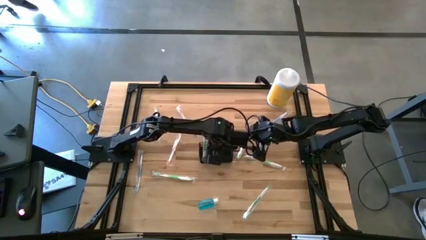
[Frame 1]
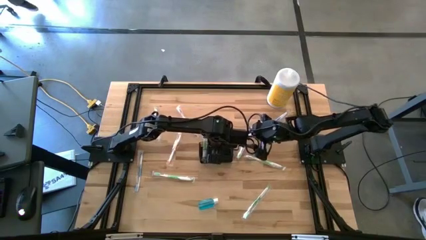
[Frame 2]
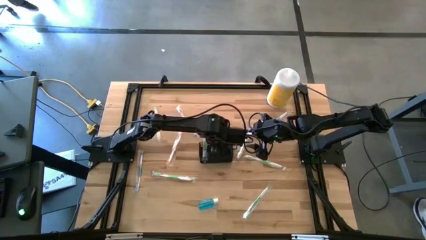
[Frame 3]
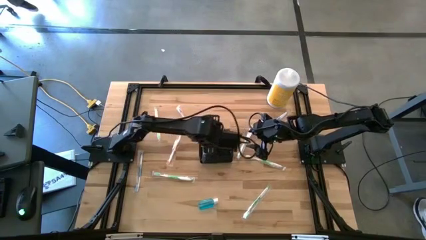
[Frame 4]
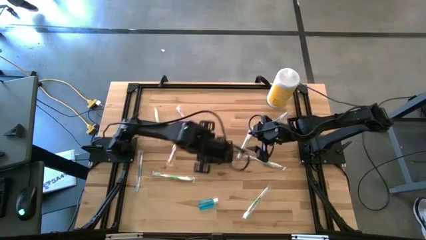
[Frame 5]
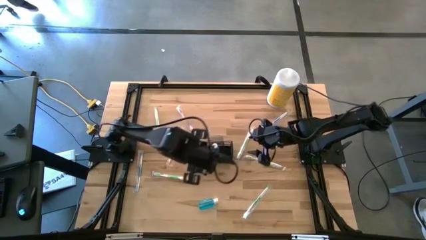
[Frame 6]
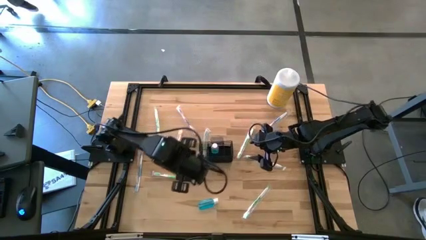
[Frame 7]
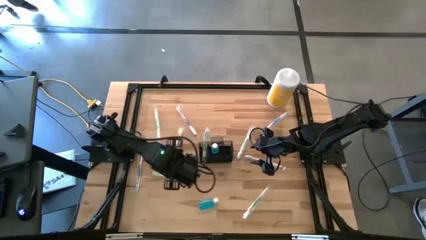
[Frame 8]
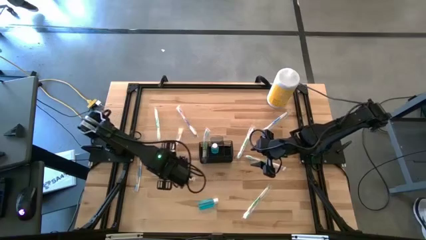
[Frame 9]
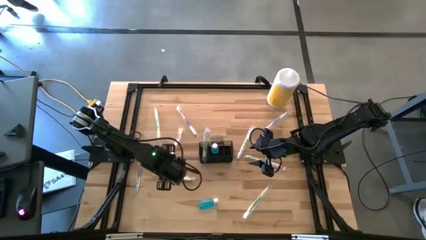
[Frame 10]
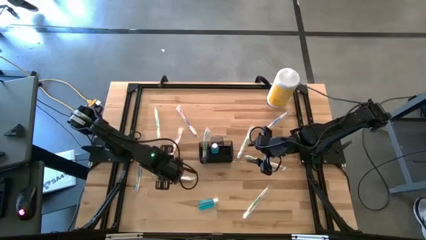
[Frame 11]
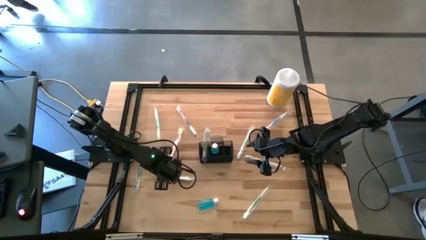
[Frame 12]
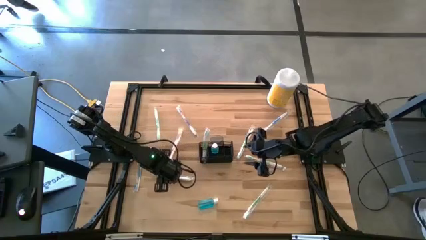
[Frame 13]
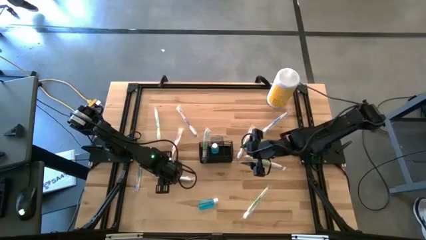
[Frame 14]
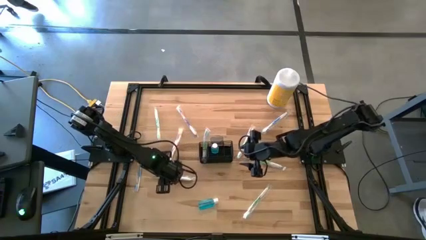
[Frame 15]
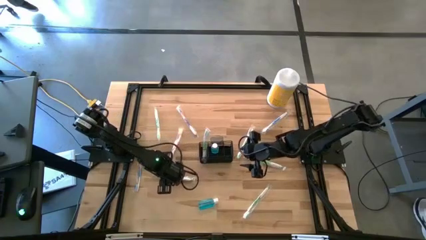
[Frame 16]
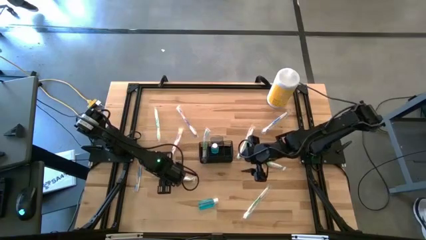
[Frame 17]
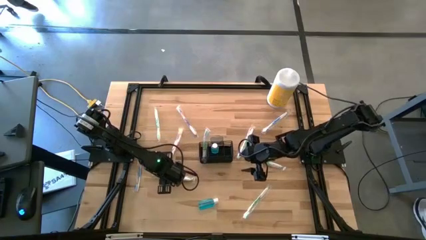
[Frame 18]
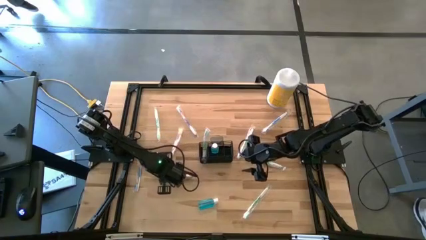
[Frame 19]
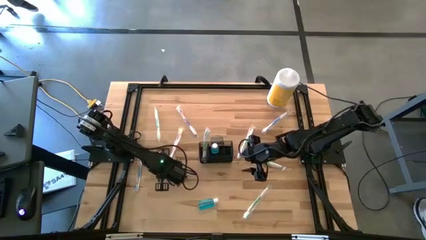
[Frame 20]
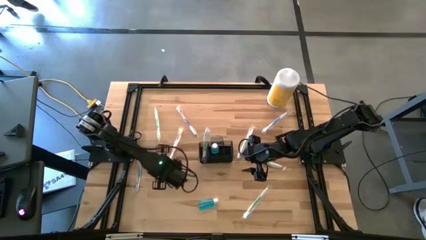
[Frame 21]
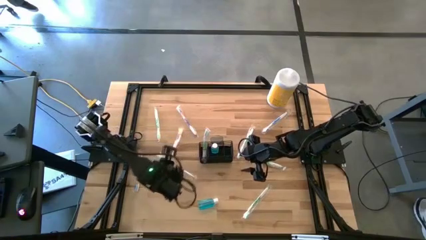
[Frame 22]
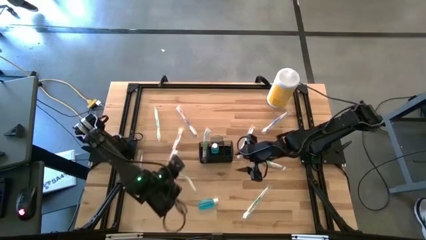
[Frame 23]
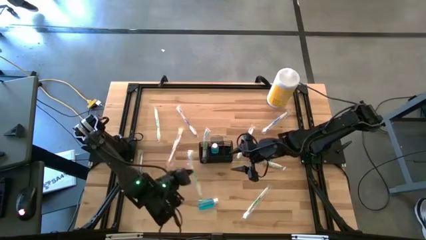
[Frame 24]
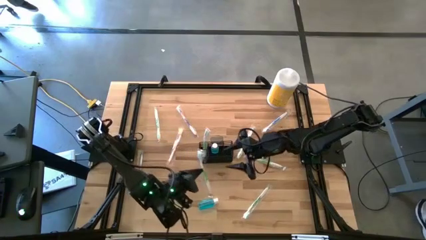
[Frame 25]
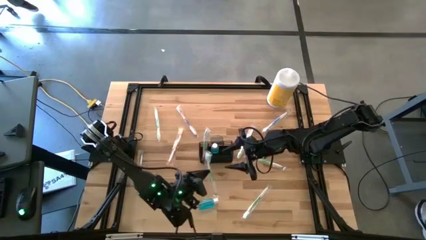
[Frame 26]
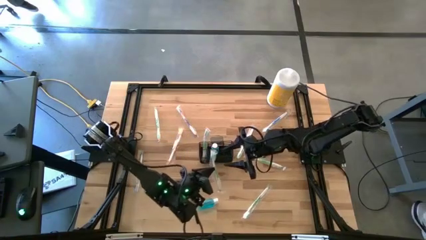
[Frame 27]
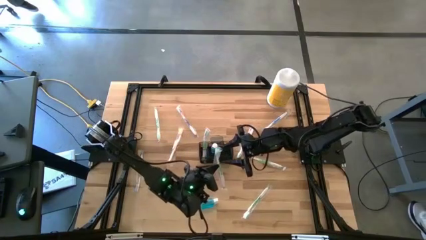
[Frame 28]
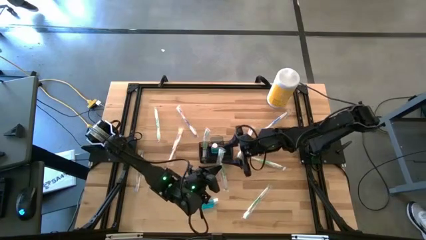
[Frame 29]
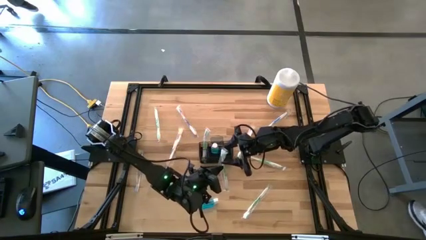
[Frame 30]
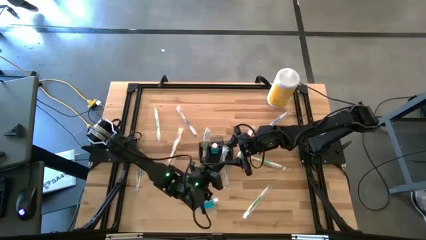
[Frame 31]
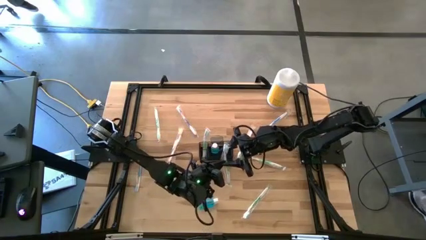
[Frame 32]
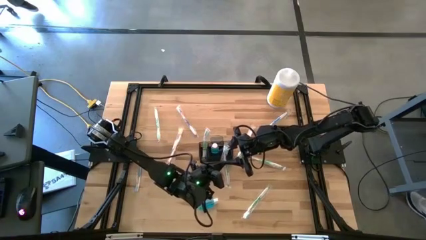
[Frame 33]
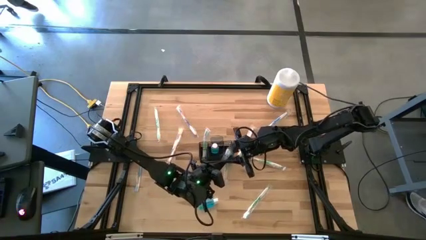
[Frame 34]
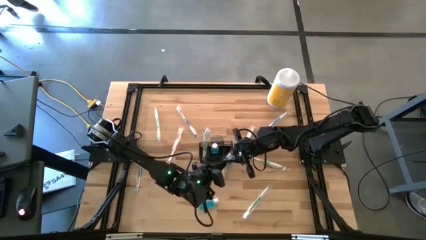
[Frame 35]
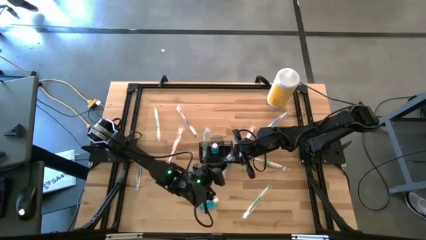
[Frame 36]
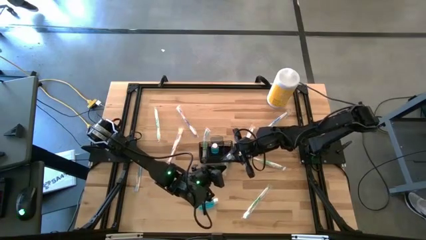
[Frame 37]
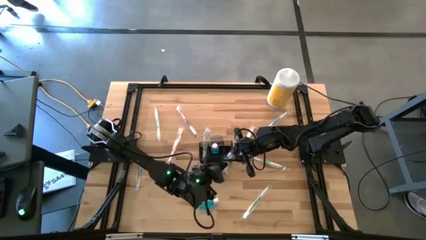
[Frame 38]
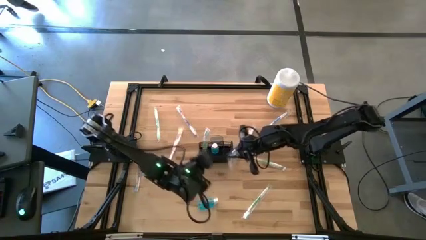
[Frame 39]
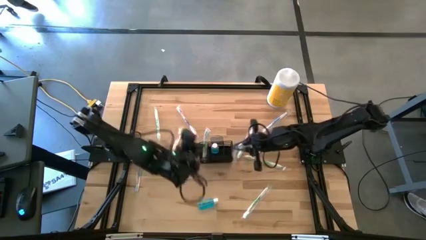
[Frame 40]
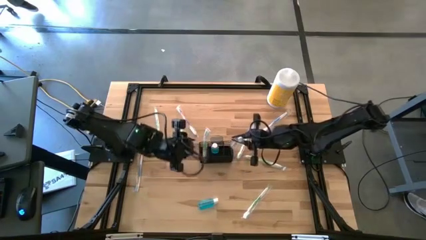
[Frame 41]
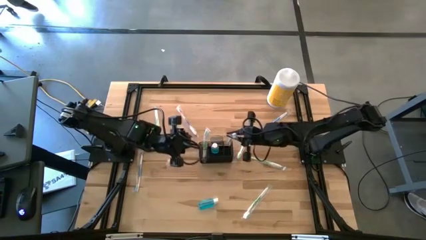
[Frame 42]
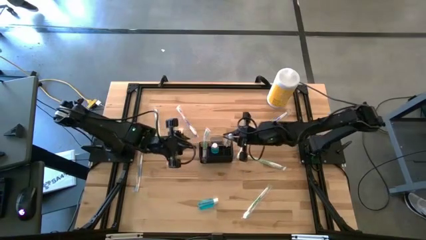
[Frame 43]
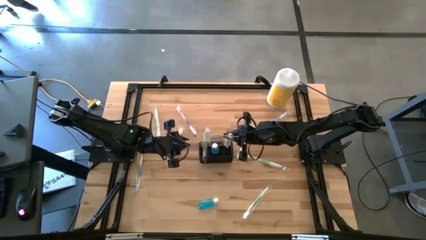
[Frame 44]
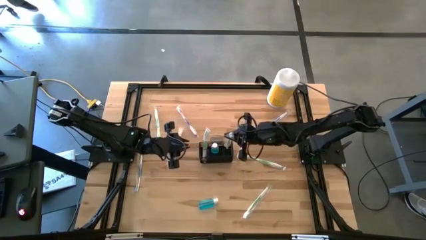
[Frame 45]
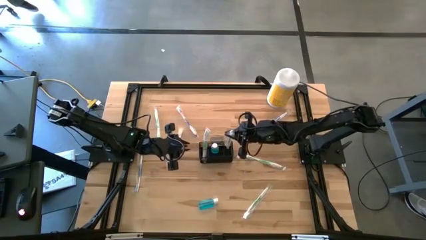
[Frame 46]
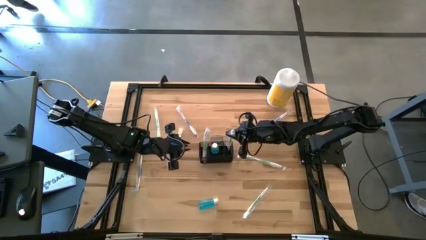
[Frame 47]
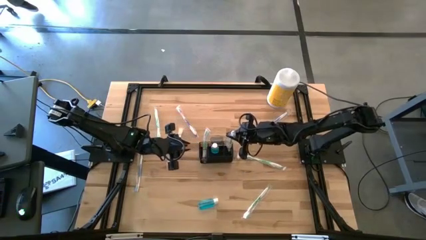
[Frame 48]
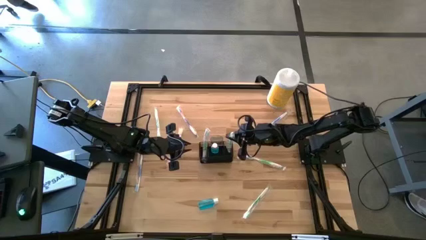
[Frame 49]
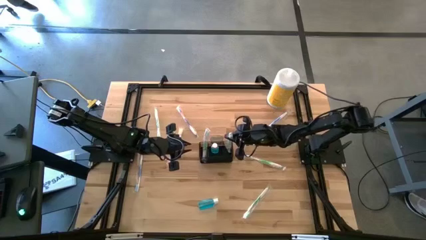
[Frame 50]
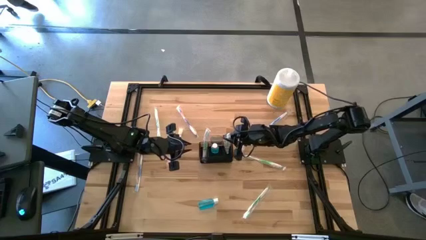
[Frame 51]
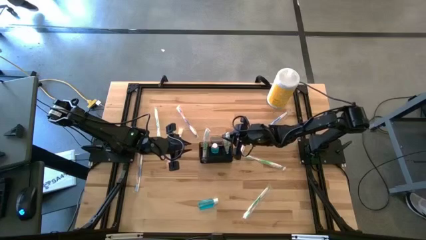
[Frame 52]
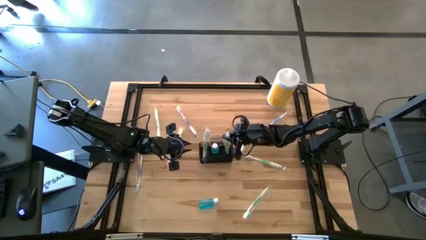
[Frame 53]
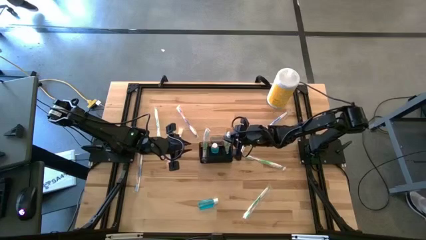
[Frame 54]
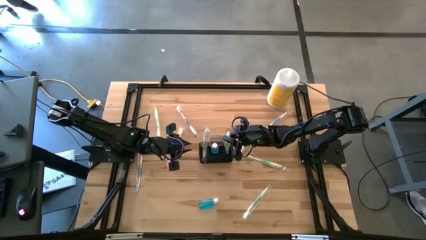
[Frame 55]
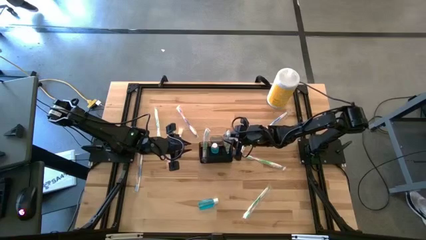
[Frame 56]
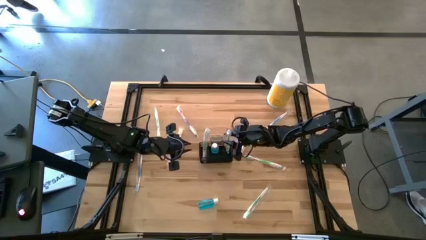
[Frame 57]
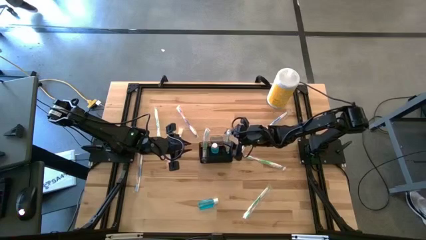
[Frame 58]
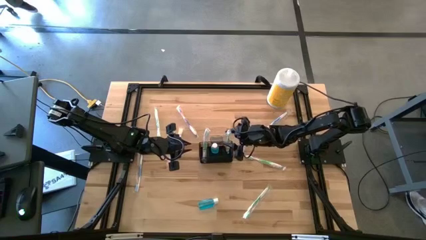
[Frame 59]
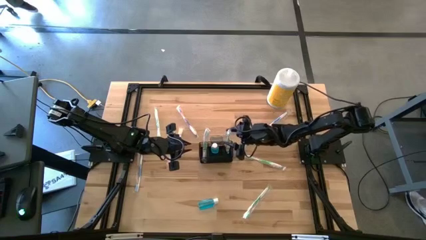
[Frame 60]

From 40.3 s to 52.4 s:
Task: Pick & Place toothbrushing station
Put the green toothbrush into the black mesh organizer

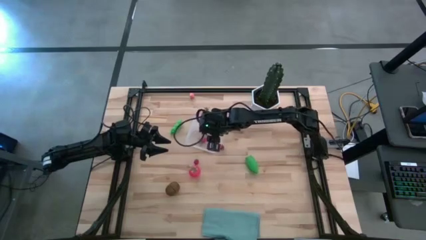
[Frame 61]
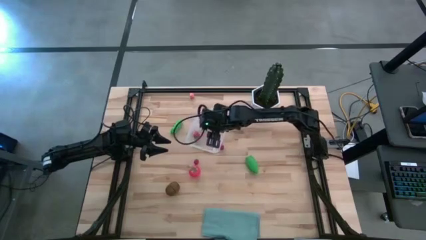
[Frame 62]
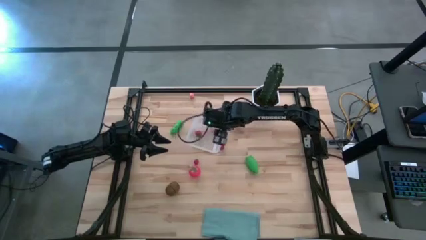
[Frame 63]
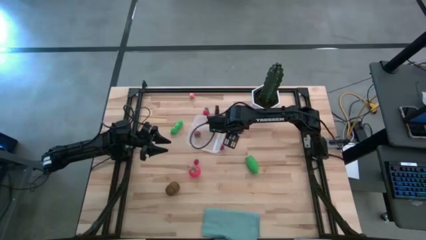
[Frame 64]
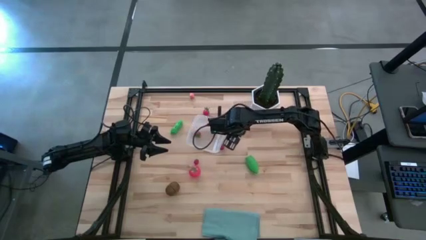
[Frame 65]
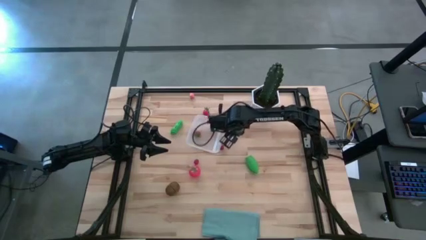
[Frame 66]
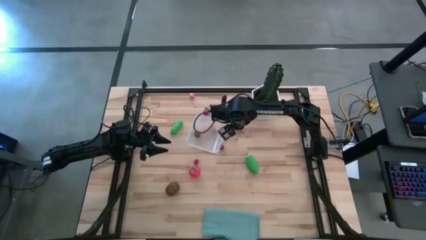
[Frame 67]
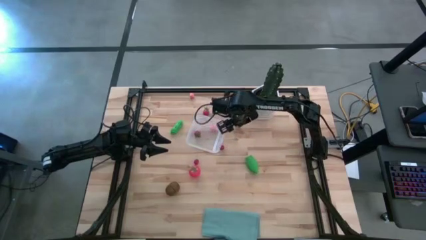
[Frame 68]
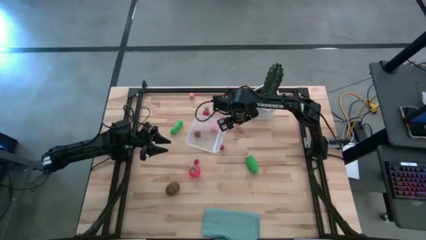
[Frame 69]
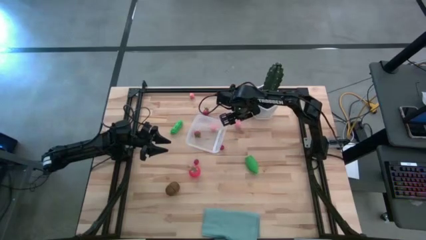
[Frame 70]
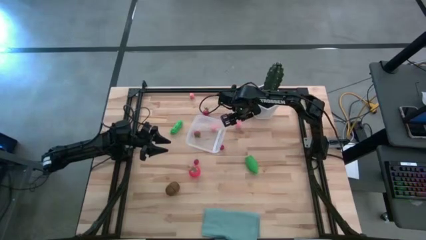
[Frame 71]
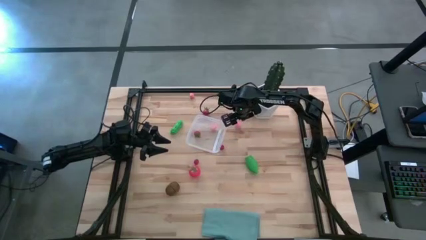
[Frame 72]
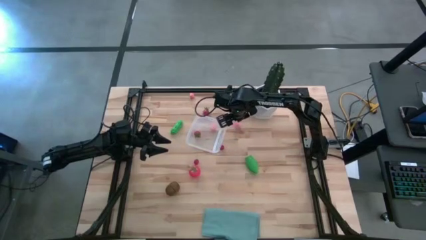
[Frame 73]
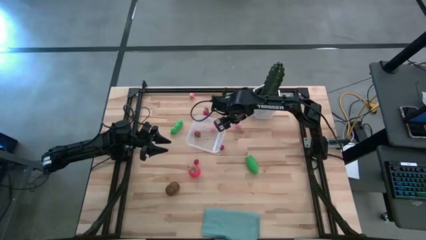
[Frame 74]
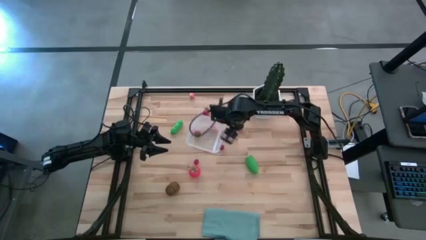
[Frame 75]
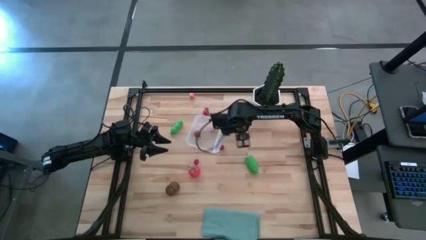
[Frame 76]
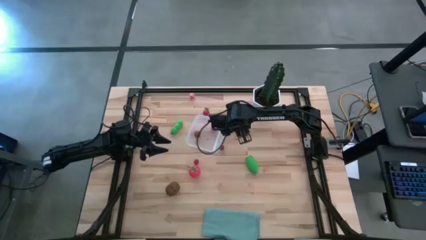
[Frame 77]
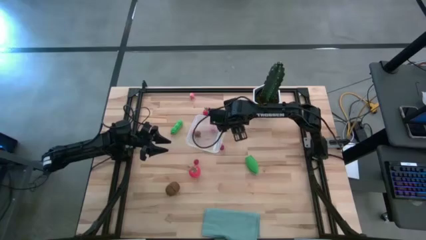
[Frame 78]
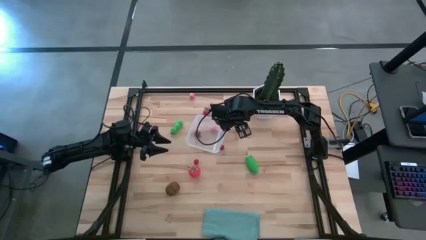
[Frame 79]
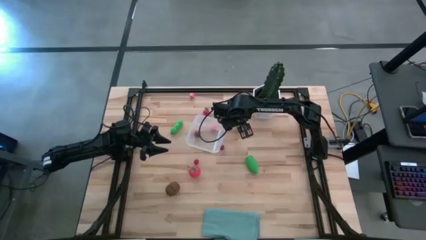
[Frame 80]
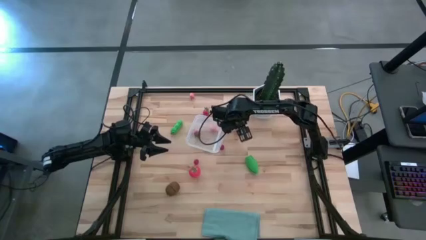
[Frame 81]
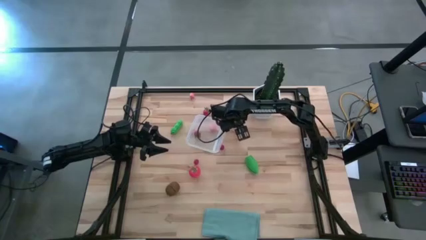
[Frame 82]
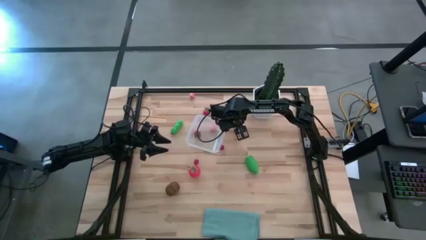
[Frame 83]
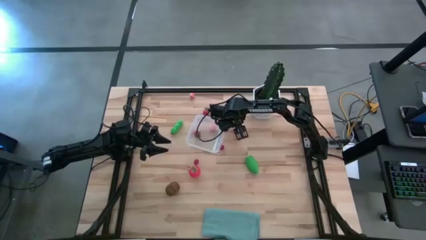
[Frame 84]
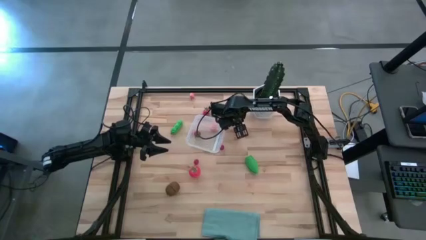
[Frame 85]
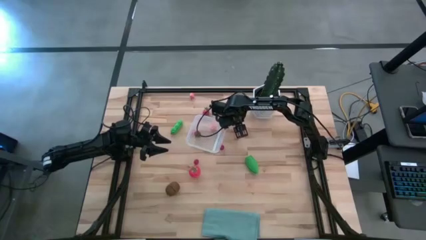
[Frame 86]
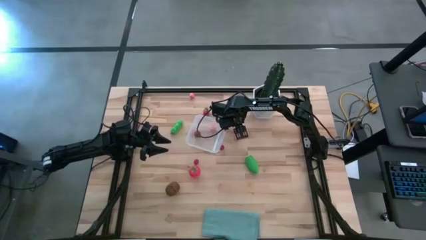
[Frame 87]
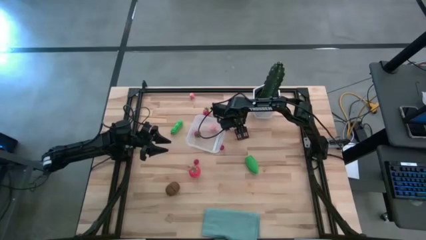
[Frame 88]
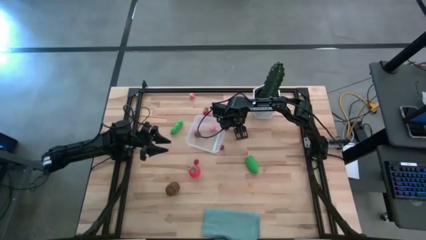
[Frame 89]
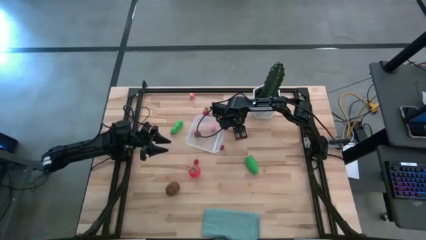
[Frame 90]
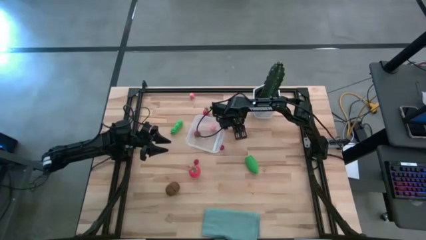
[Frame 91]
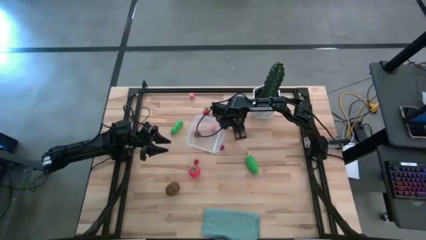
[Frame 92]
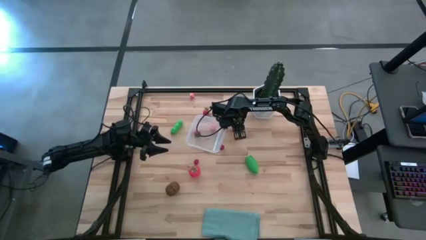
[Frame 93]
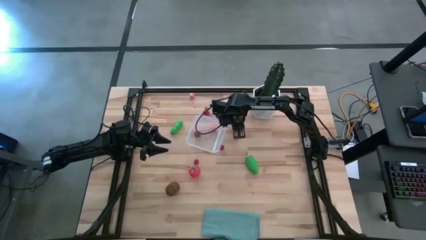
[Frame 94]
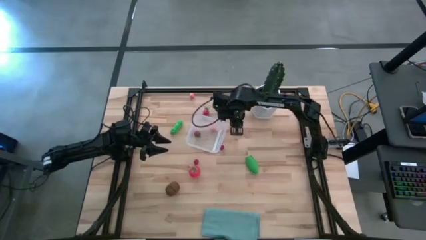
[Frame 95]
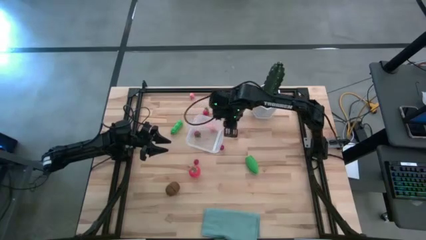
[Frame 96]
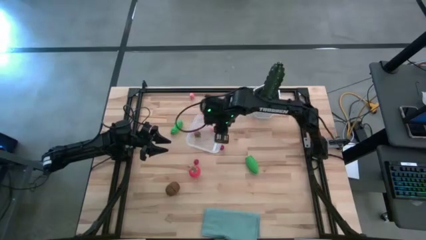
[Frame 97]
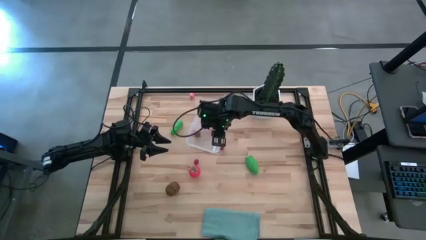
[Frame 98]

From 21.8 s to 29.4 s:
Task: Pick and placing Produce into tupperware
Put the right pink peach into the transparent bin
